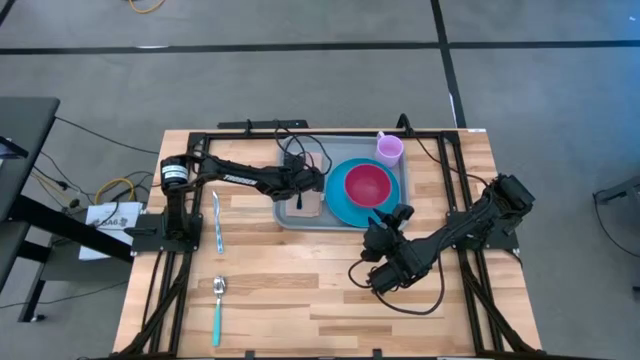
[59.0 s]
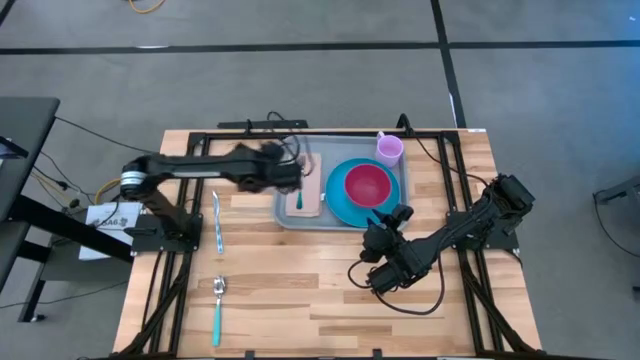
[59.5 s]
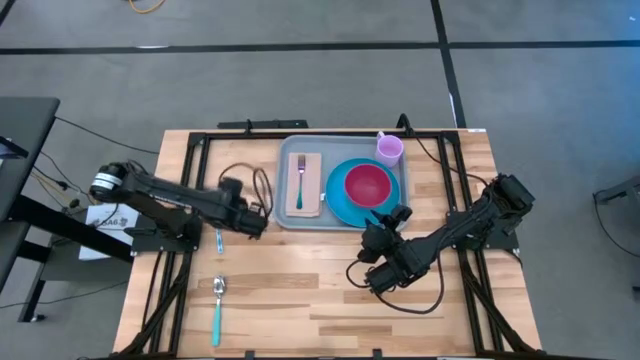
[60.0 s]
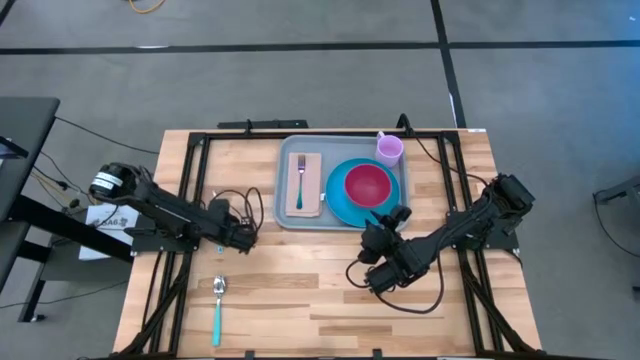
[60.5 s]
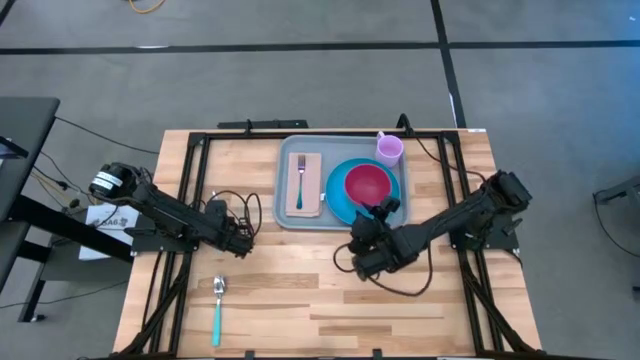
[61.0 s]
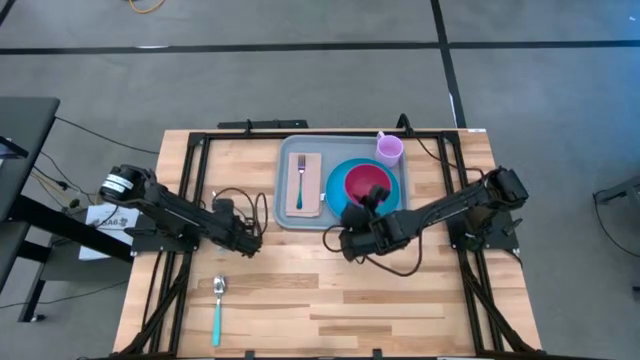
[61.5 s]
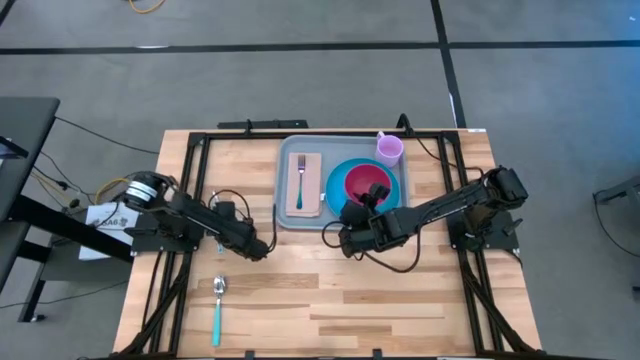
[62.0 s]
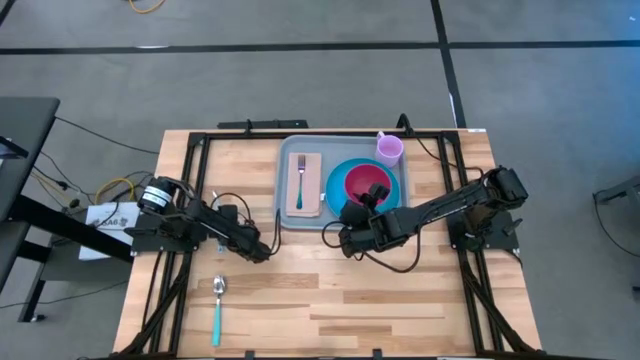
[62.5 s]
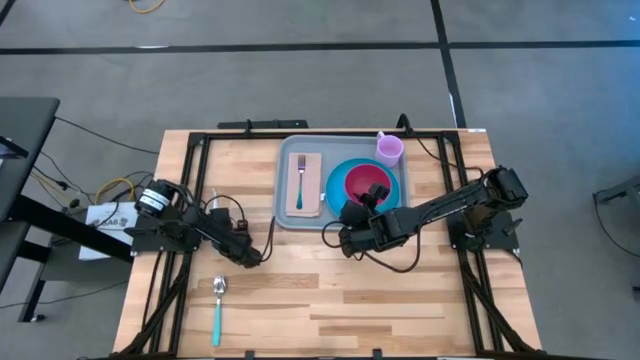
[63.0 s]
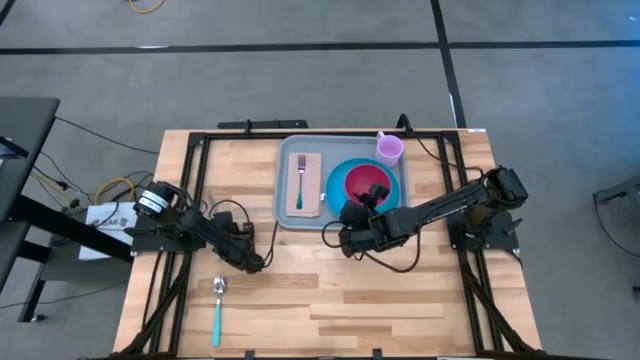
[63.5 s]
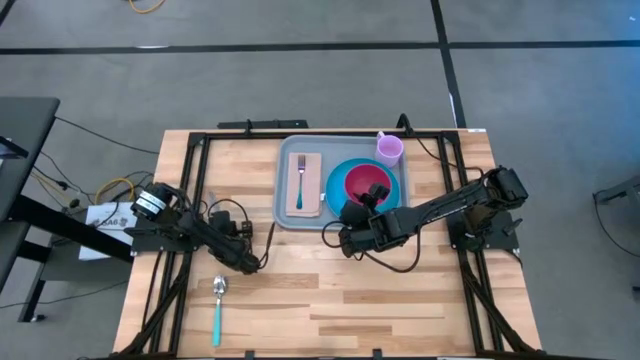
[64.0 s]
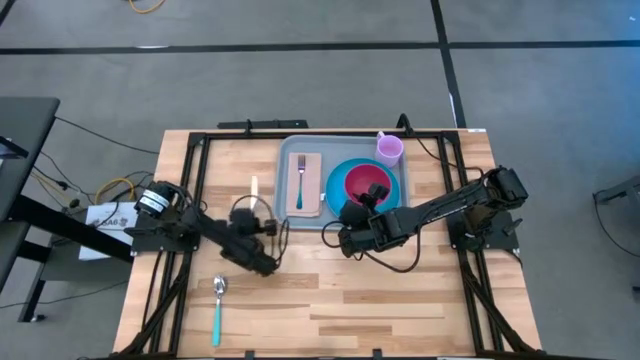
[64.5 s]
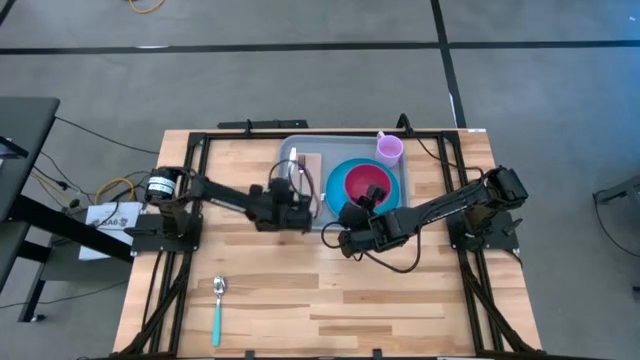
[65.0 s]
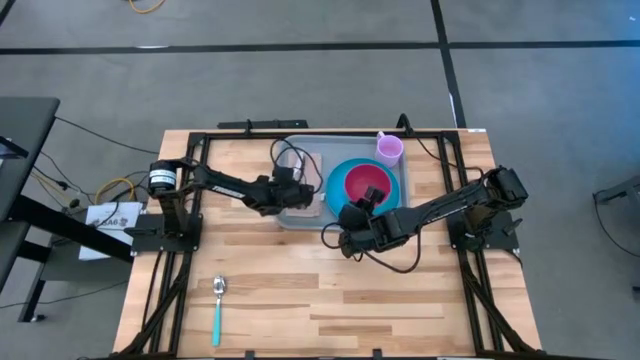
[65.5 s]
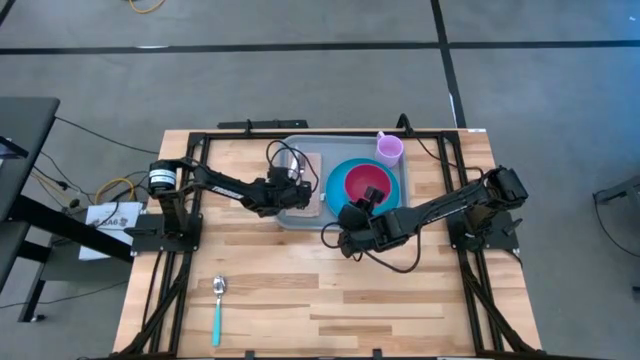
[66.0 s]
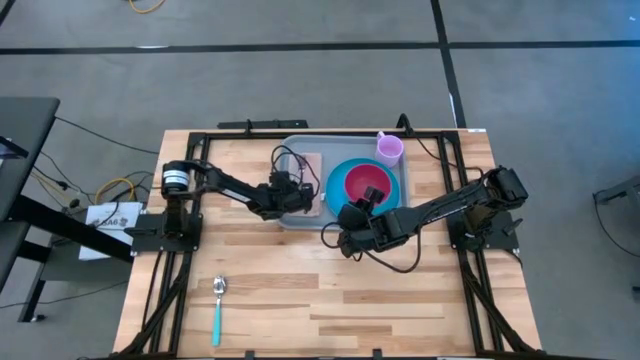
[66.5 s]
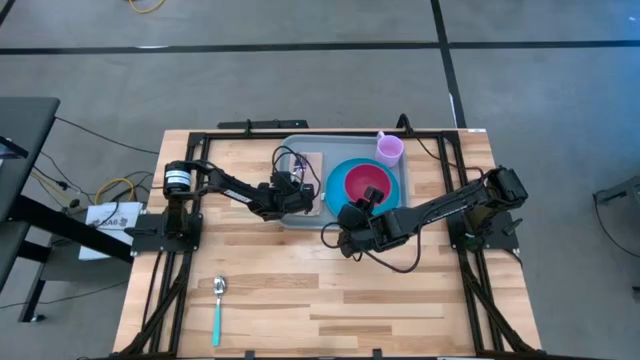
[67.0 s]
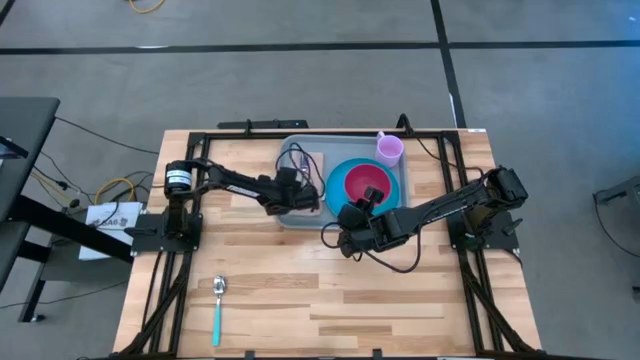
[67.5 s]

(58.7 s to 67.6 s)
Task: Set up tray
Put the blue knife to the left of the blue fork on the brown napkin

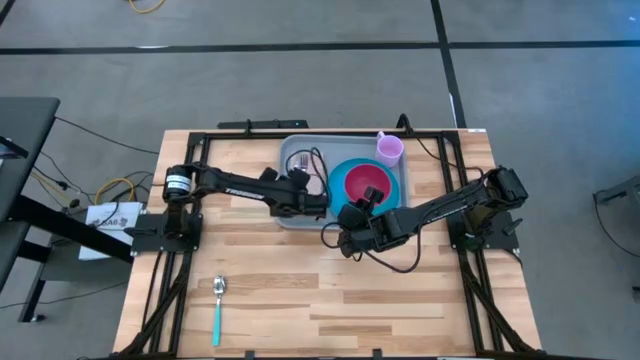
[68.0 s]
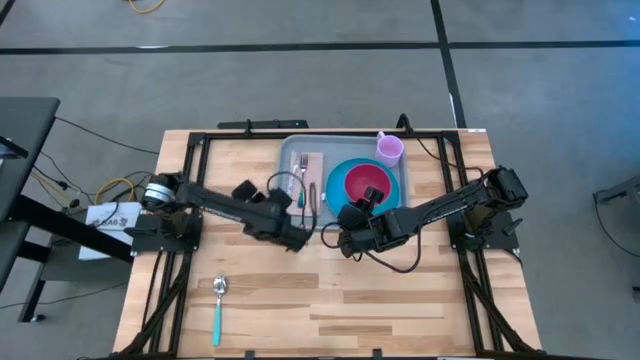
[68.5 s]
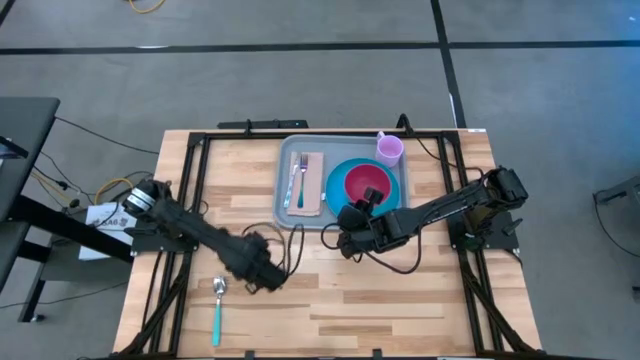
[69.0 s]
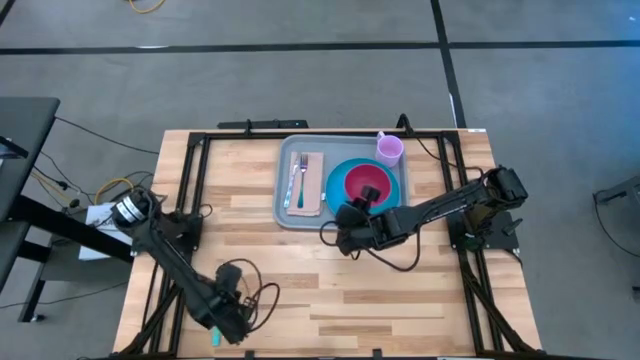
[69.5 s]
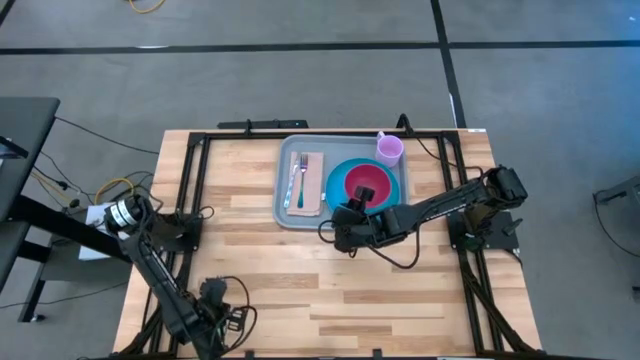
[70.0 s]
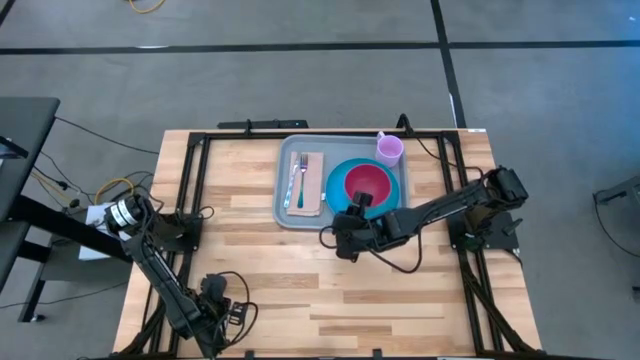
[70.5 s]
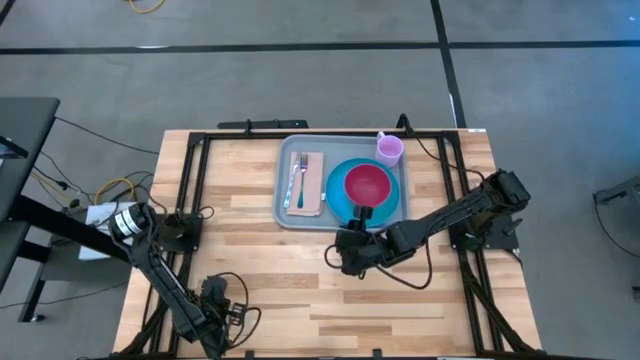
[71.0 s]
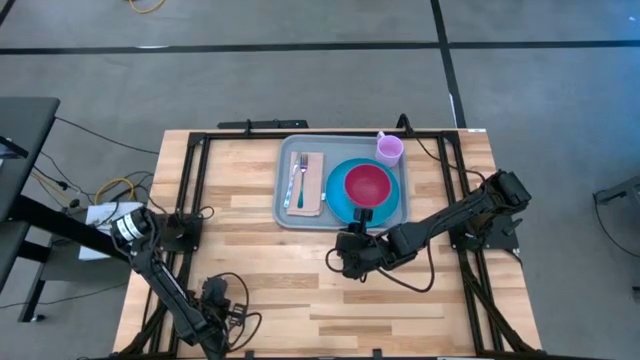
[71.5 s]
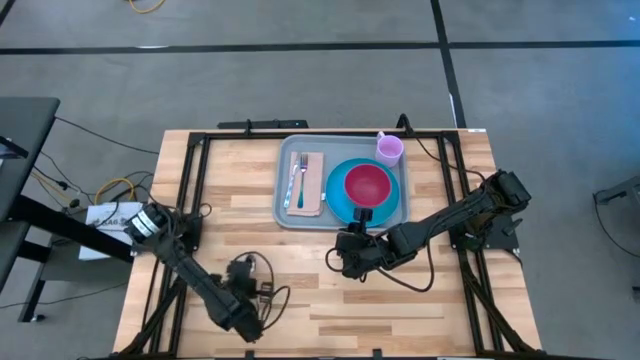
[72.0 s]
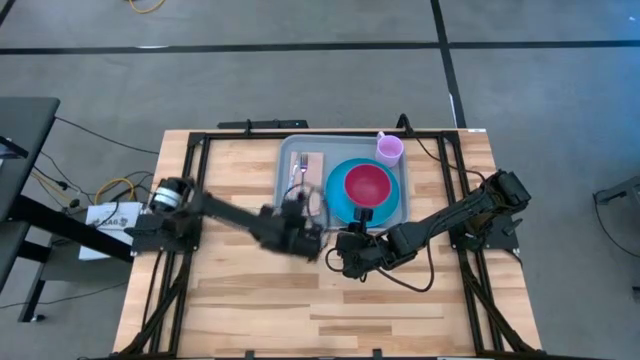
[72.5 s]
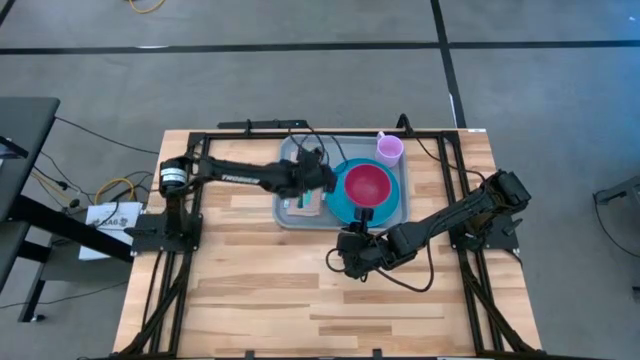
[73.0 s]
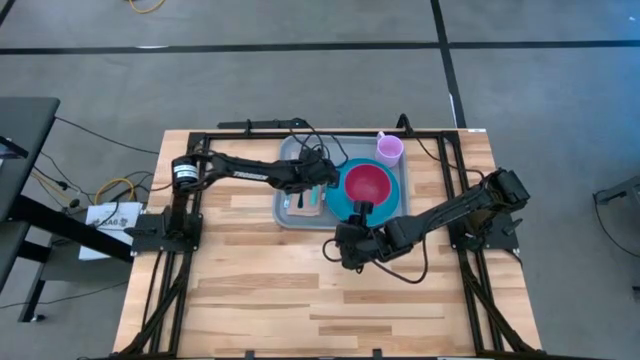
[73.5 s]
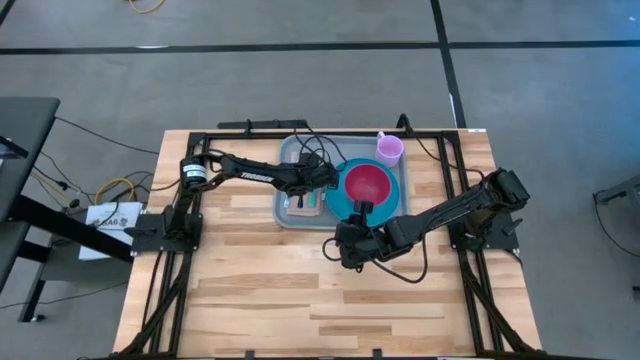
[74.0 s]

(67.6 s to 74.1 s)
Put the blue spoon to the right of the blue fork on the brown napkin

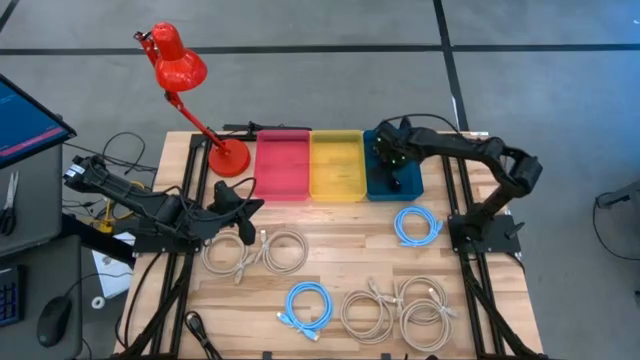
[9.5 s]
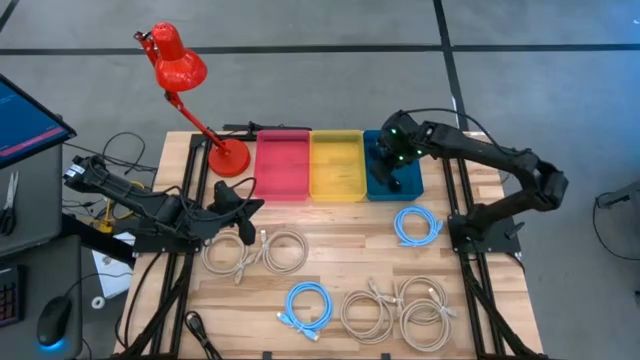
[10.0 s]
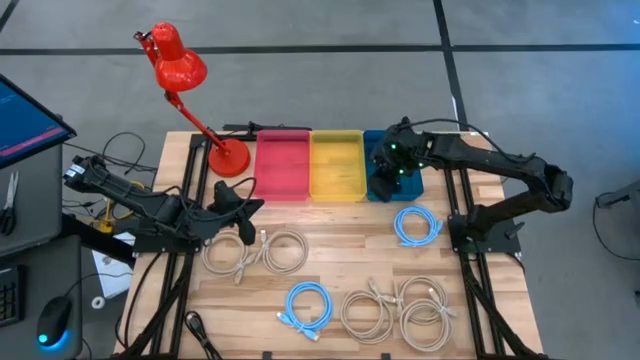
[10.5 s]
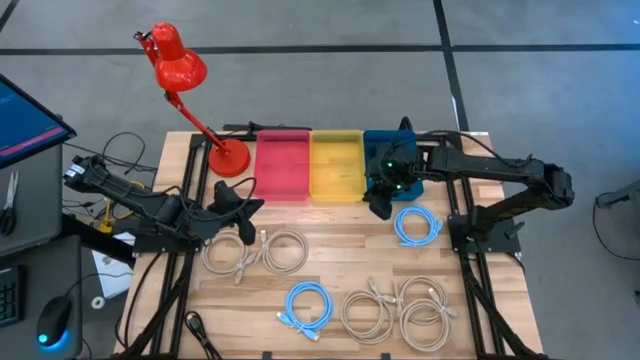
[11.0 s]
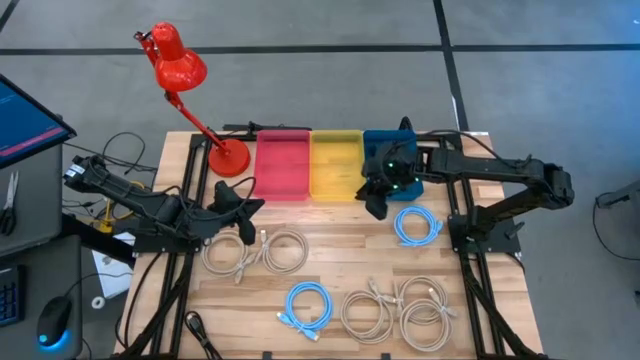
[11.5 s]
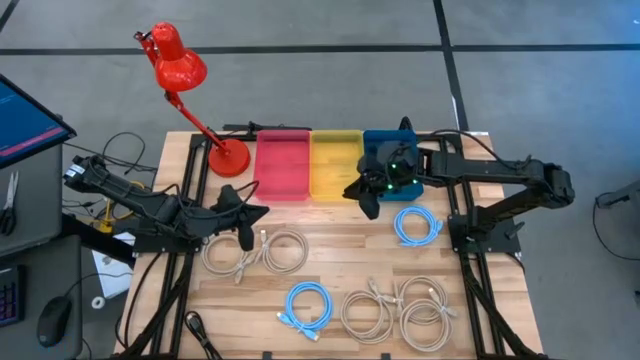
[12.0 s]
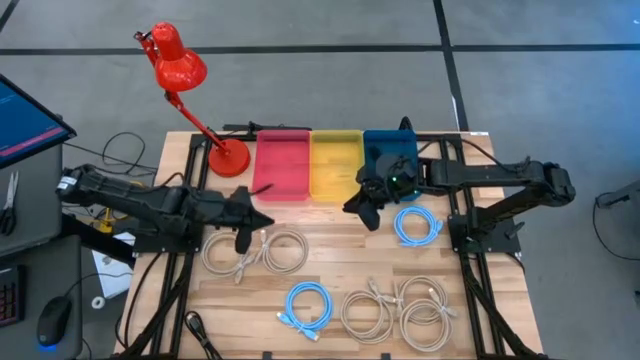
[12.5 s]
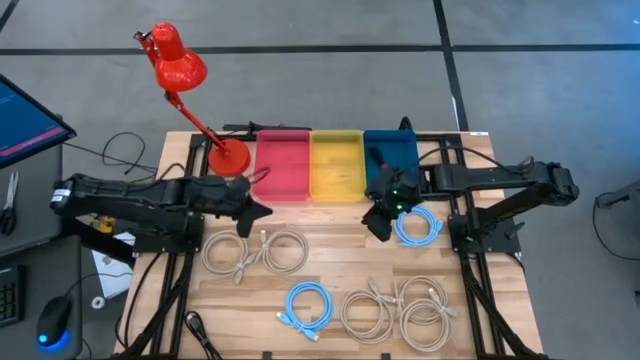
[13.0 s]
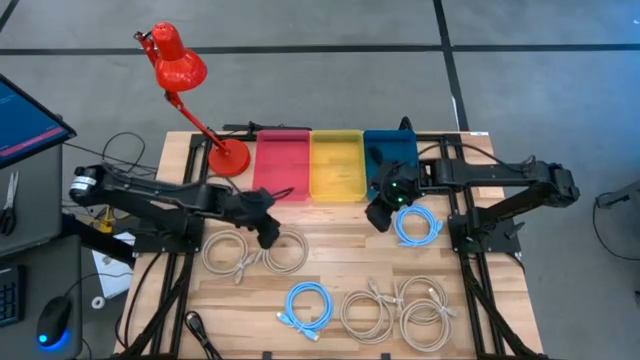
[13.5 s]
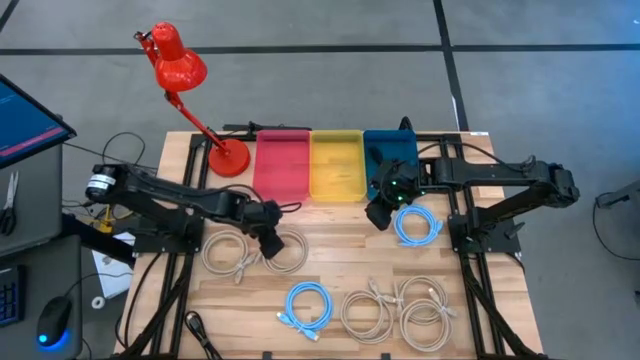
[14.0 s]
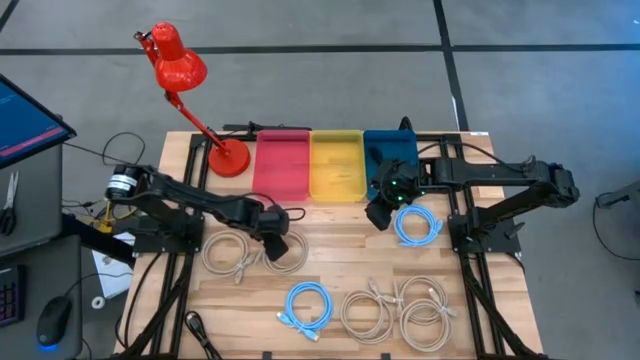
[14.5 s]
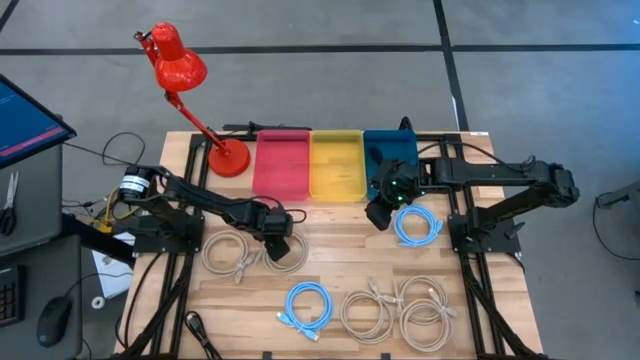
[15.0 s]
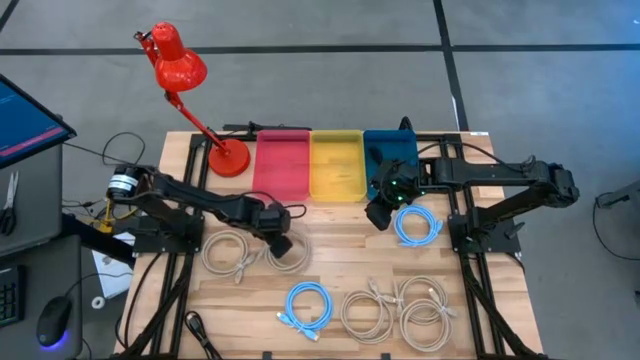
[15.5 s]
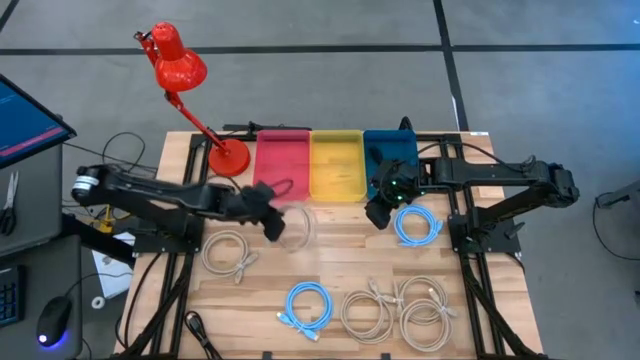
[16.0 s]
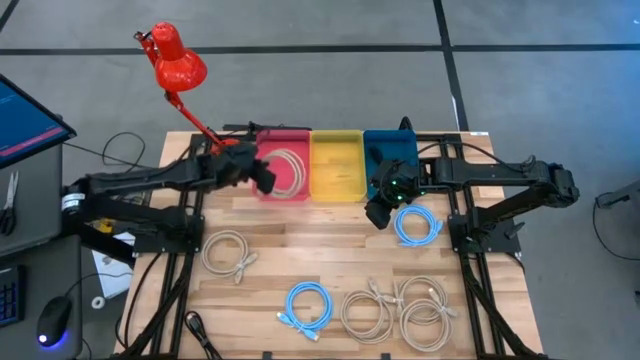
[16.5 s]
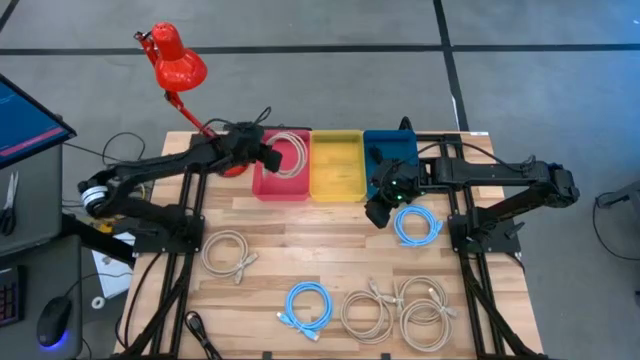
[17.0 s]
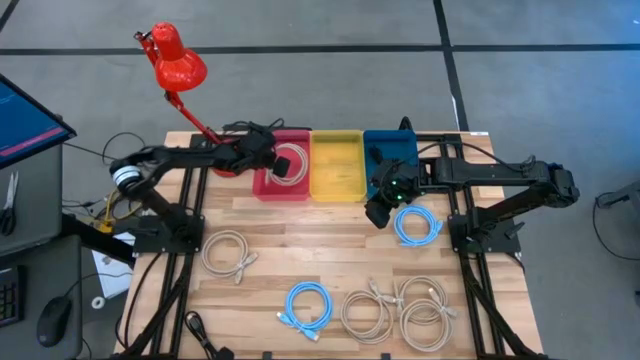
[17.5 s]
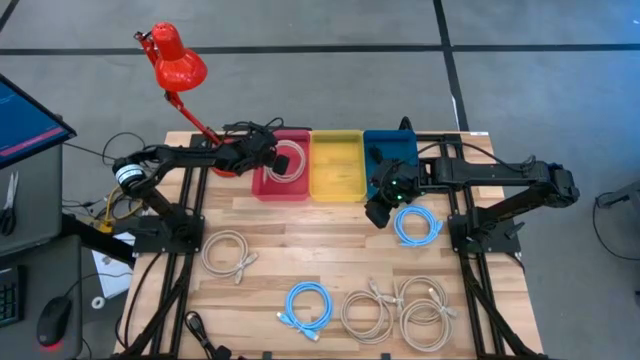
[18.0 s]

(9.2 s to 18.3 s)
Task: Pick & Place USB Port
Put the brown charger cable into the red bin
